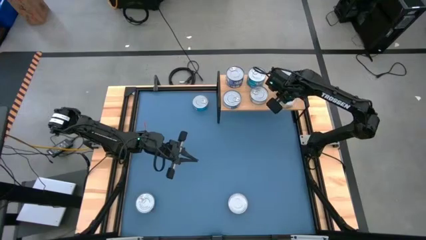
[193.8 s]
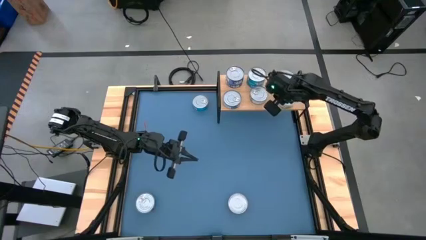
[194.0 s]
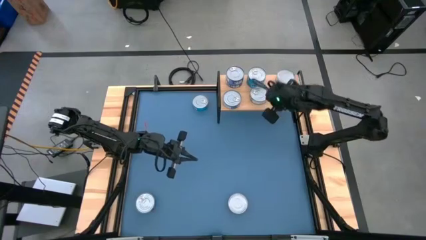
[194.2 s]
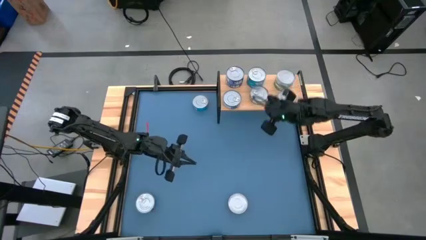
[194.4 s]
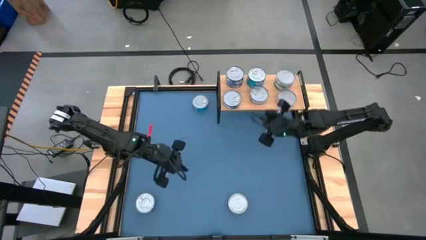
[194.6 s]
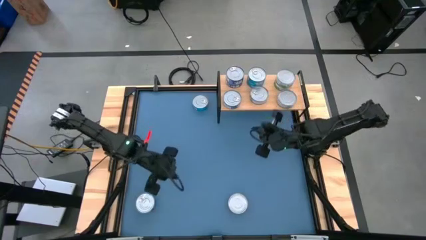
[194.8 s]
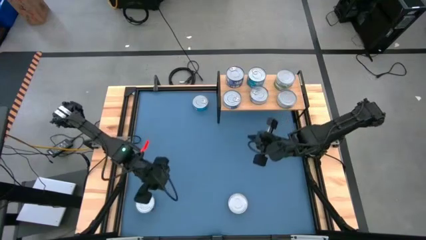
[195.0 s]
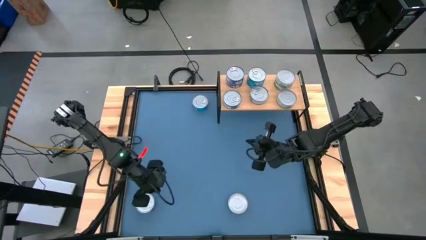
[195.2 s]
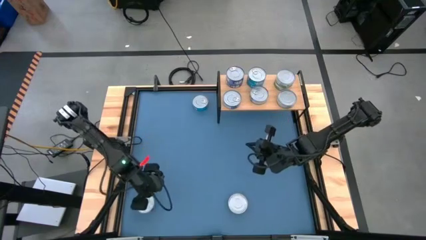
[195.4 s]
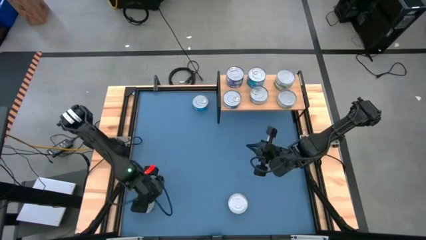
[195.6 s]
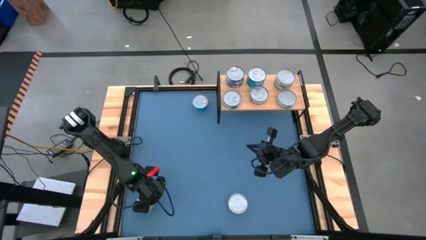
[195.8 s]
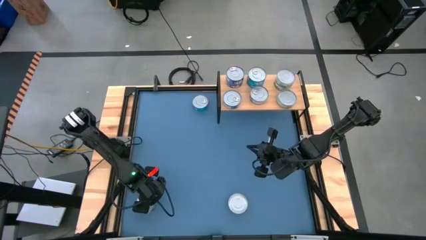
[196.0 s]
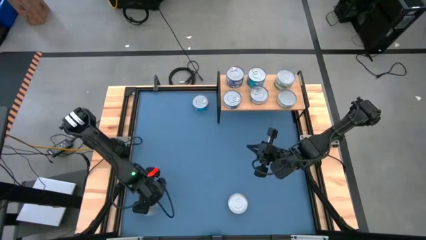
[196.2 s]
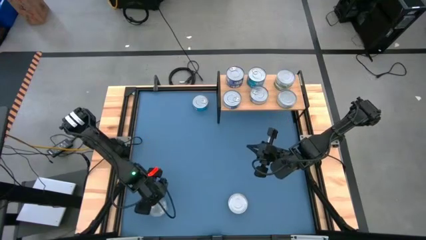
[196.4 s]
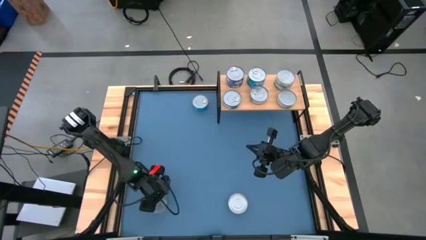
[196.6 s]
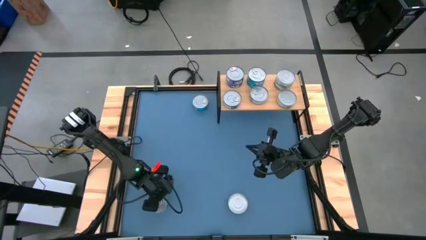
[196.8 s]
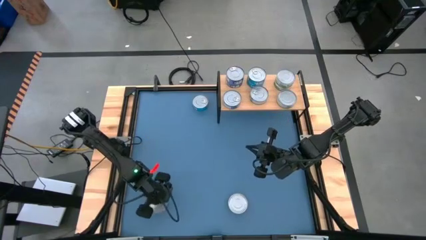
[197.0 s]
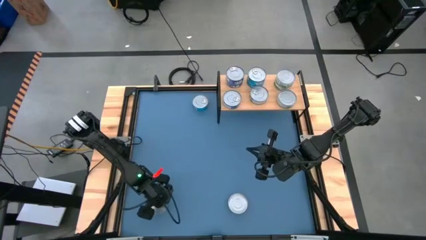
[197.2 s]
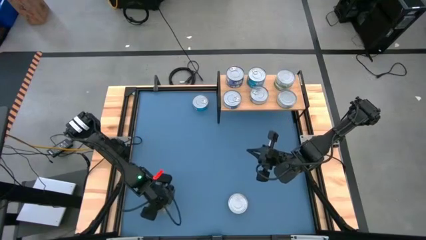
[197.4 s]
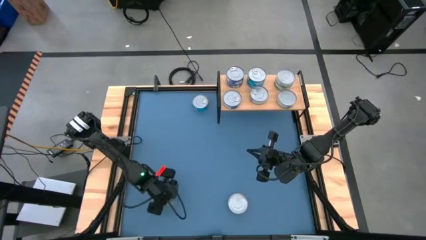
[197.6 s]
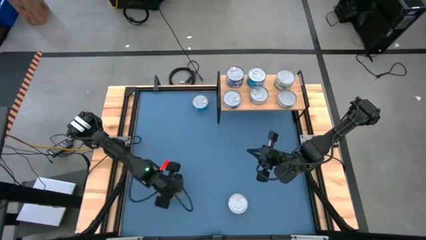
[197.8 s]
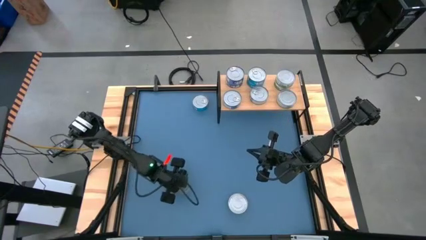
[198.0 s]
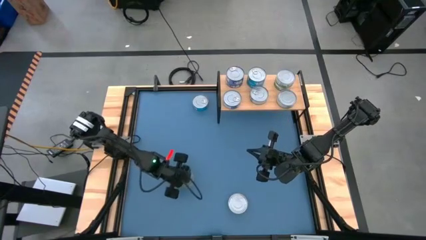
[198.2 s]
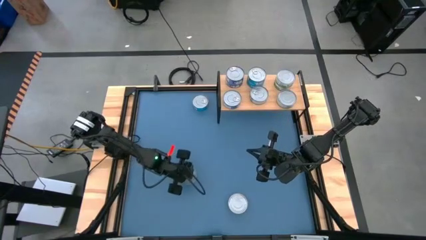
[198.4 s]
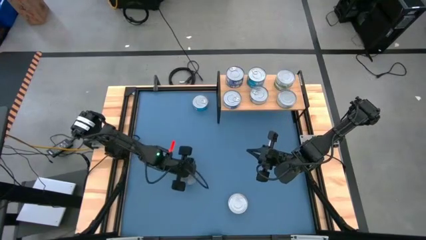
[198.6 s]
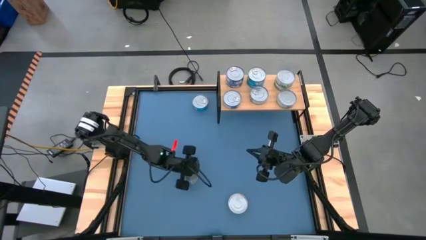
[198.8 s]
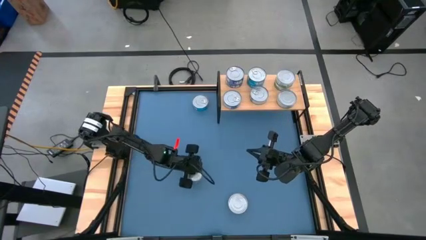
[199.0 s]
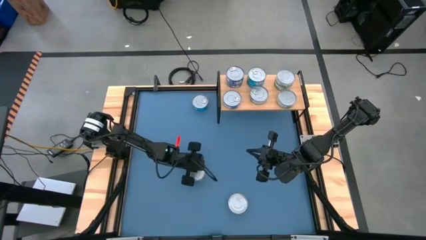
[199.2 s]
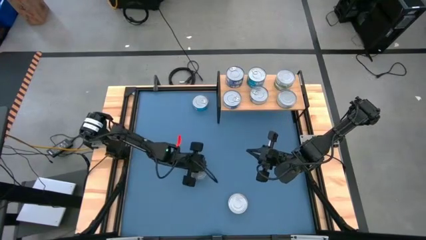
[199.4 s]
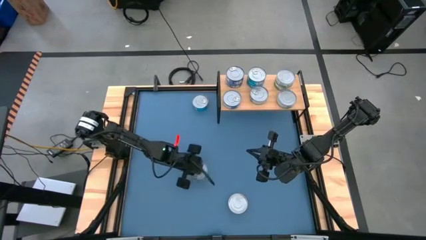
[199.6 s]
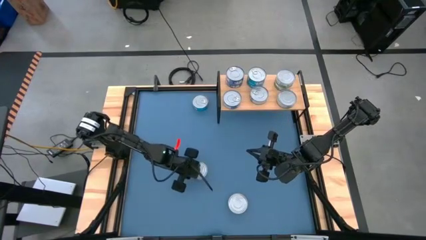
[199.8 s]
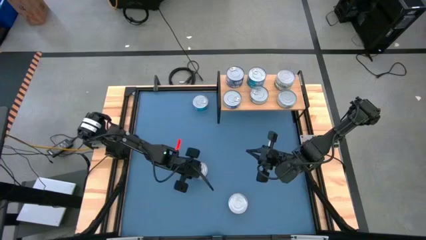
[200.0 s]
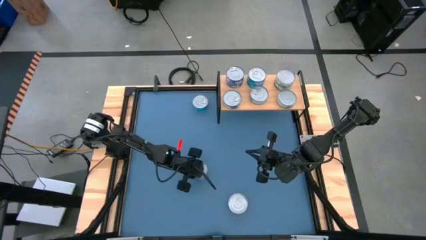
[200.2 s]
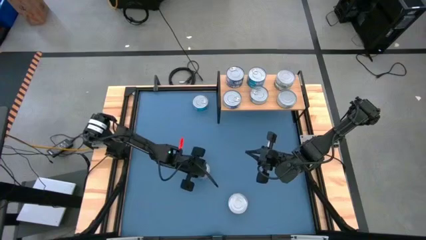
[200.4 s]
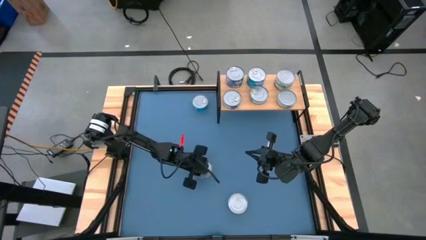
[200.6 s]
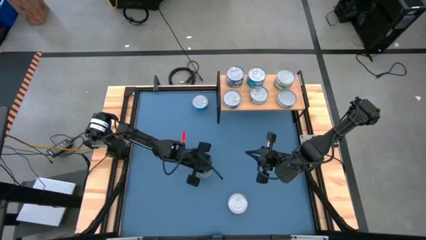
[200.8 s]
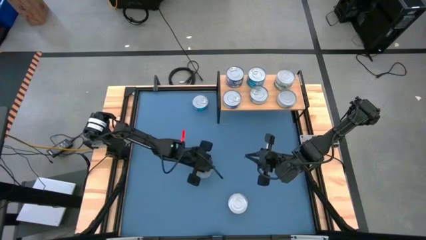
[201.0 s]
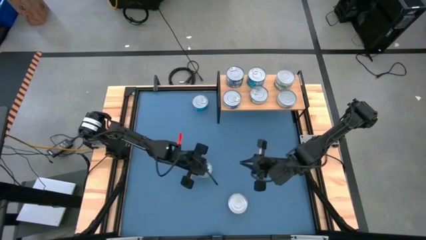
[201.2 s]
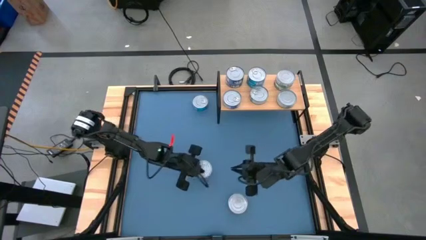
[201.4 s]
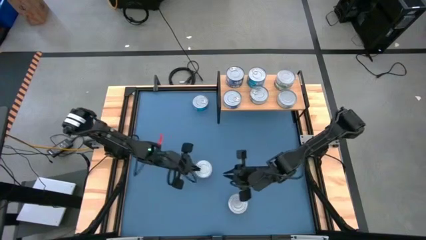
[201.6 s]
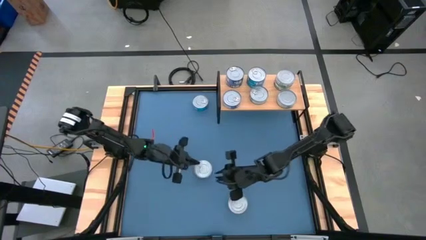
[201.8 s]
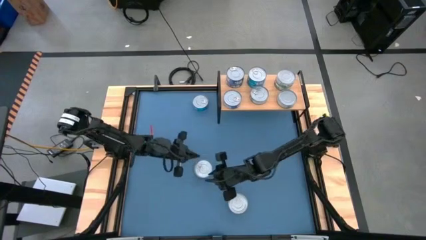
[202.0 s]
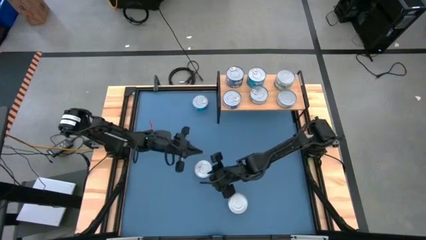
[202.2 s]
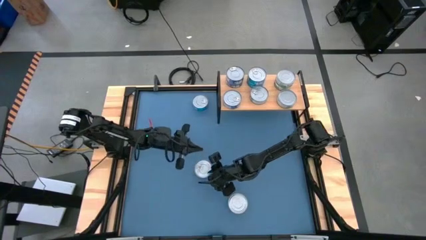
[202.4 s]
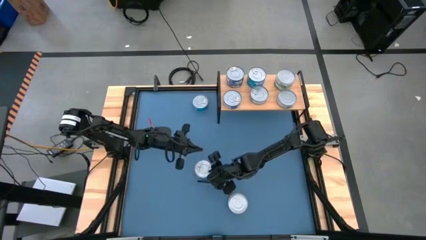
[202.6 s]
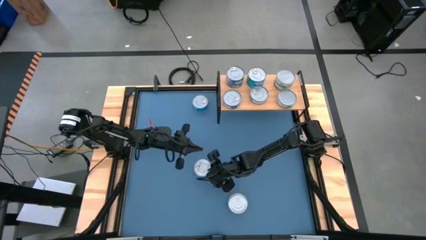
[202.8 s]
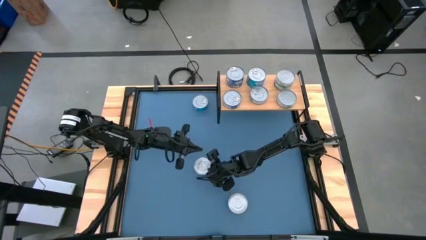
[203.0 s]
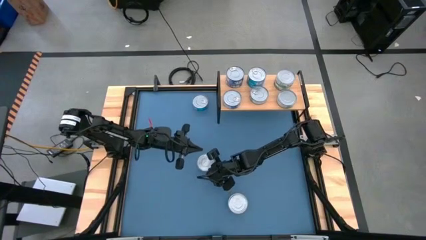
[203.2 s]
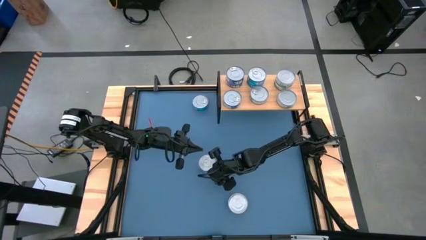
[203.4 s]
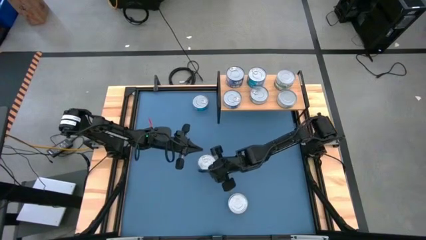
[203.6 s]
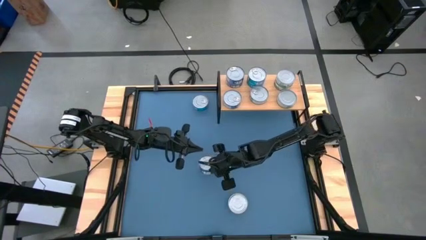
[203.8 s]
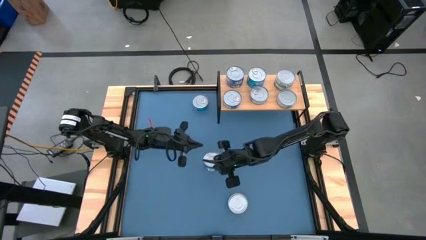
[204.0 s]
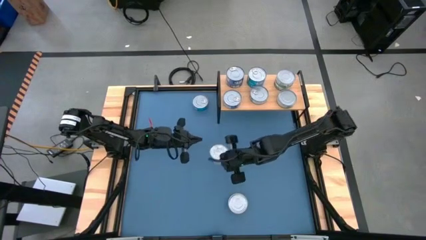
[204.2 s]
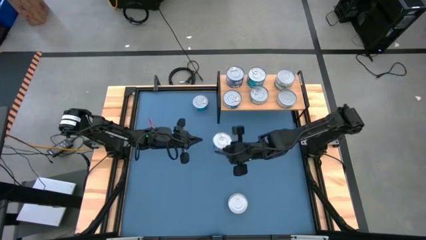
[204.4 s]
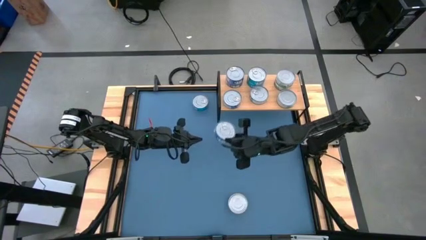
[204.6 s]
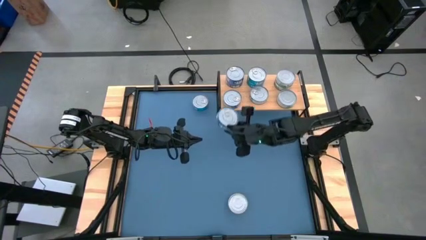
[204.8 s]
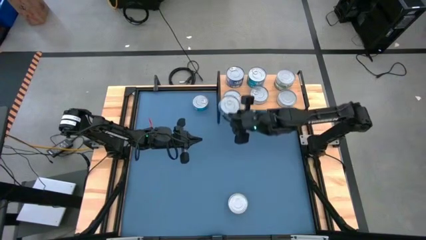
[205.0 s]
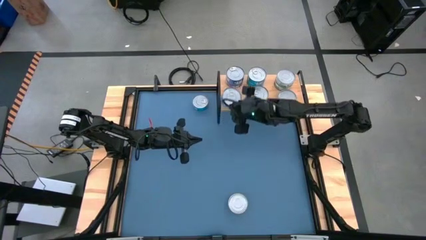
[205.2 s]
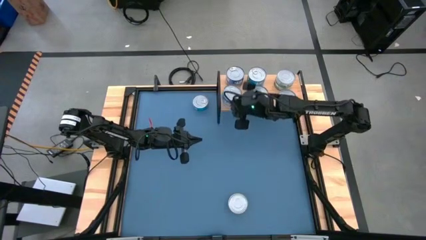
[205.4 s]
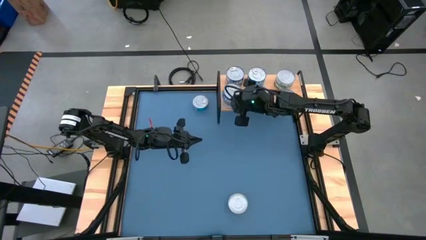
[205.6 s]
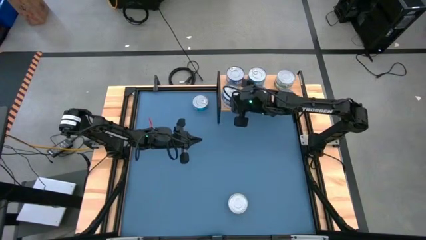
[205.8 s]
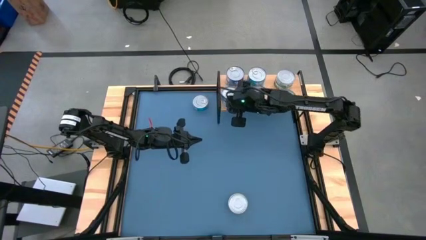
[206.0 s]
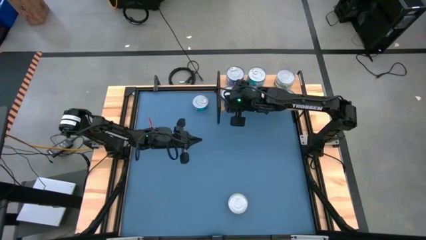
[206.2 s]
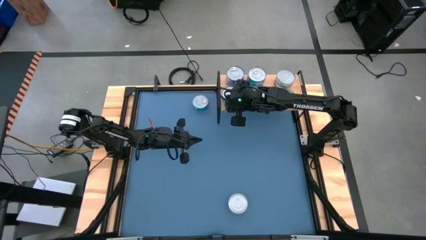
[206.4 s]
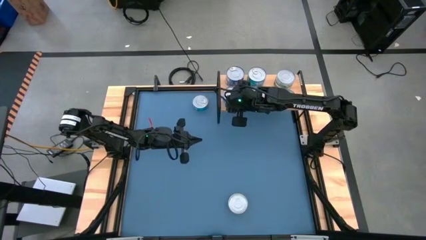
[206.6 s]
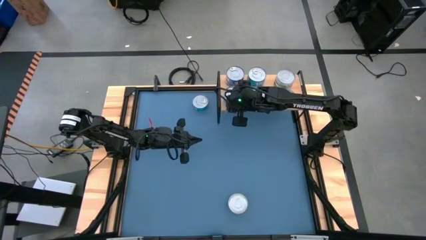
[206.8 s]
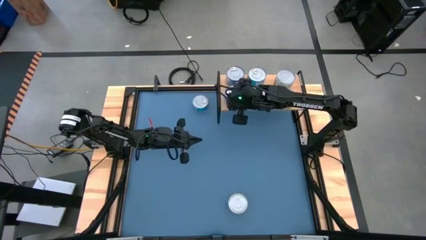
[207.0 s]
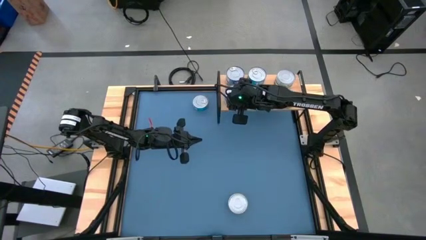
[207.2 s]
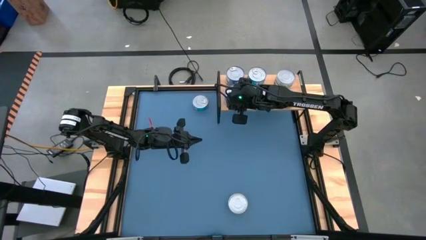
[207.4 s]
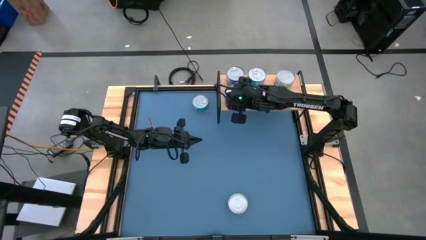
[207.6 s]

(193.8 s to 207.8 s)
Task: Stack canned seafood by type on shelf
Stack the blue tuna can on top of the blue tuna can on the shelf

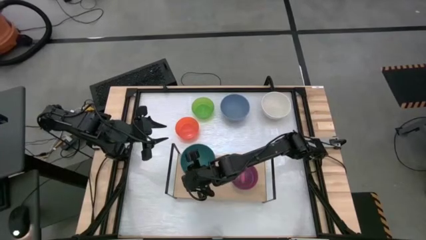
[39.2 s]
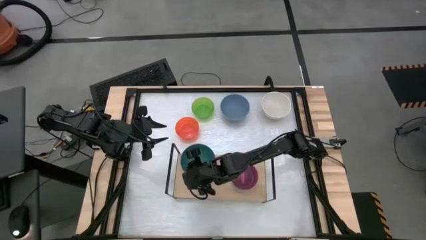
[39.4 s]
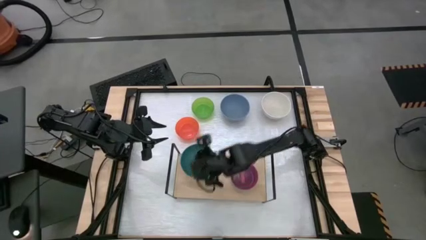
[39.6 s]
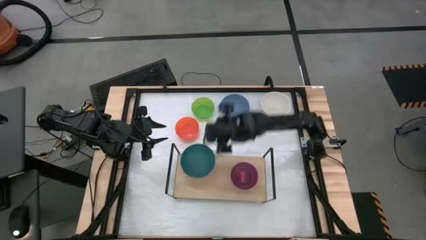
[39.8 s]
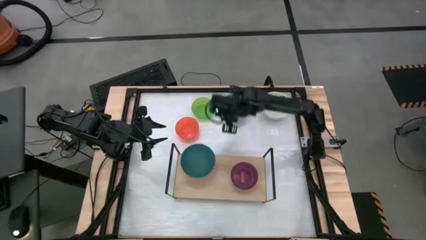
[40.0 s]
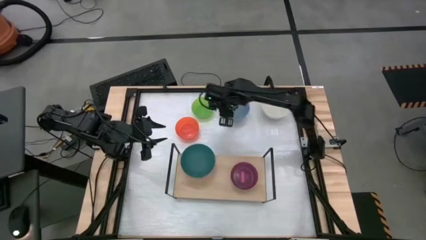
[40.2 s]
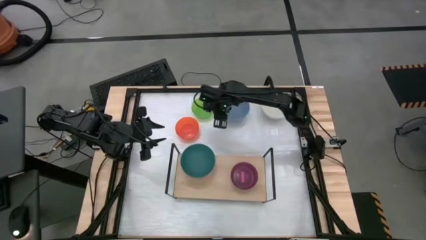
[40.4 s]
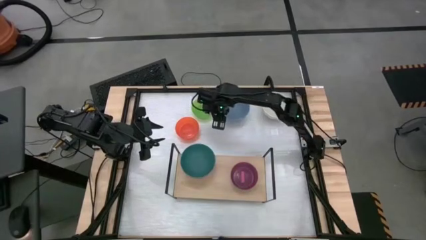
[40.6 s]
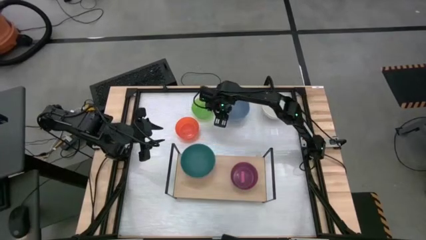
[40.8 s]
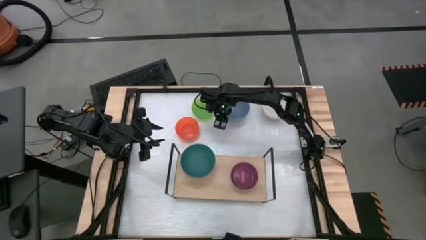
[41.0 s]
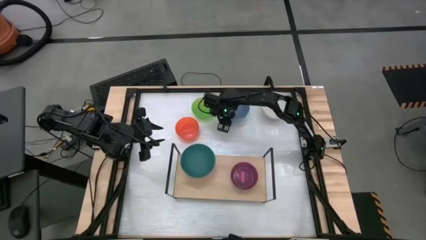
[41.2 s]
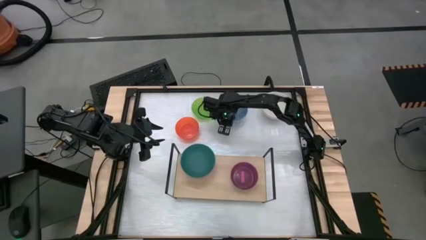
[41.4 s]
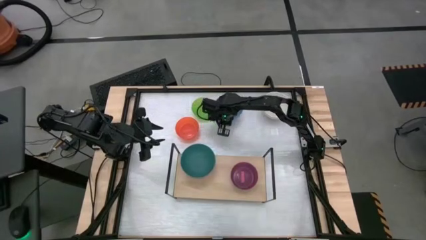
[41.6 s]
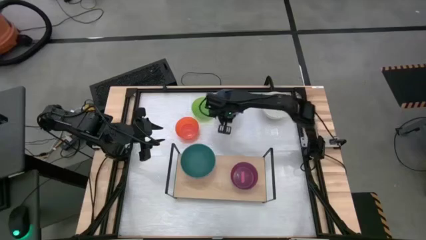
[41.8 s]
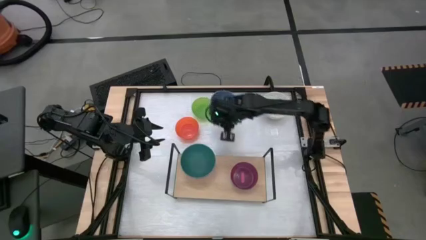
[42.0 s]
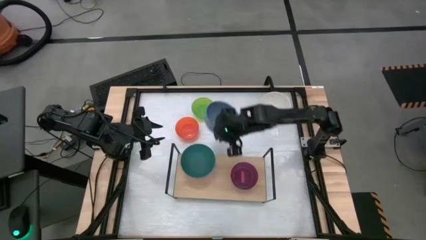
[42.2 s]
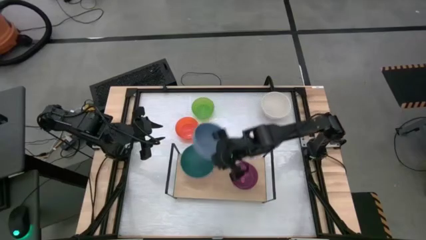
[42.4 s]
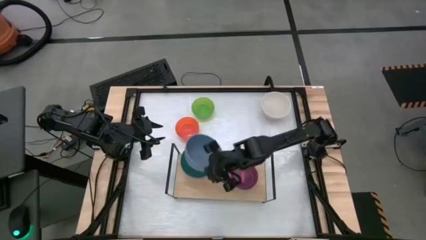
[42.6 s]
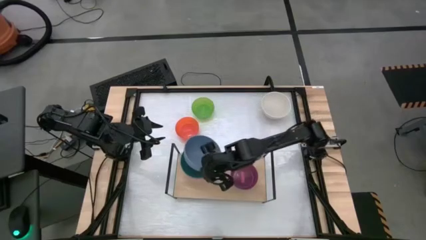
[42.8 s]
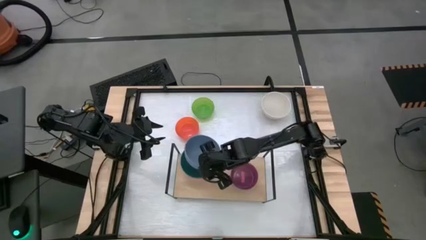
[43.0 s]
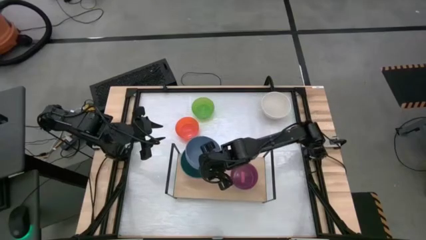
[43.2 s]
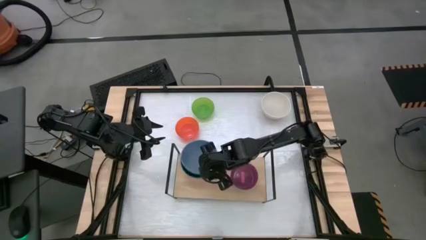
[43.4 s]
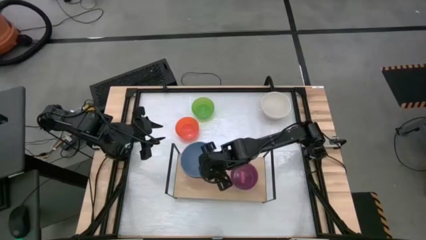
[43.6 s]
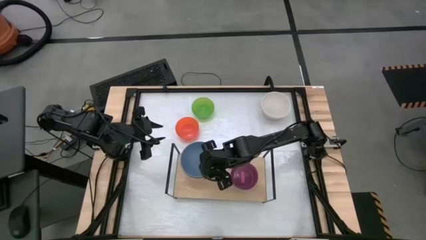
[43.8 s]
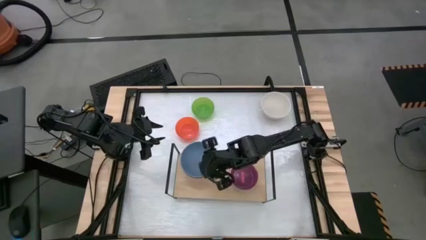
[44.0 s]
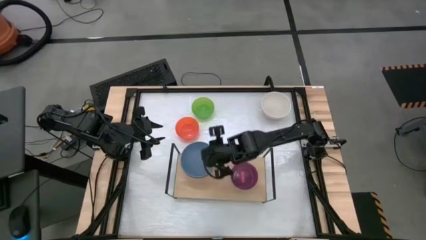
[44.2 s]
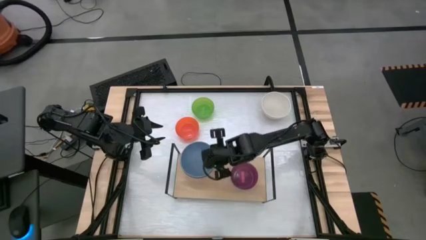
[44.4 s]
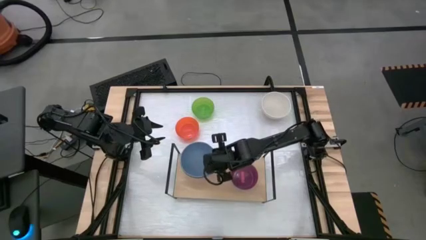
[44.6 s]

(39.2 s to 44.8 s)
Task: Place and stack bowls onto a shelf
Stack the big light blue bowl on top of the big dark green bowl on the shelf
